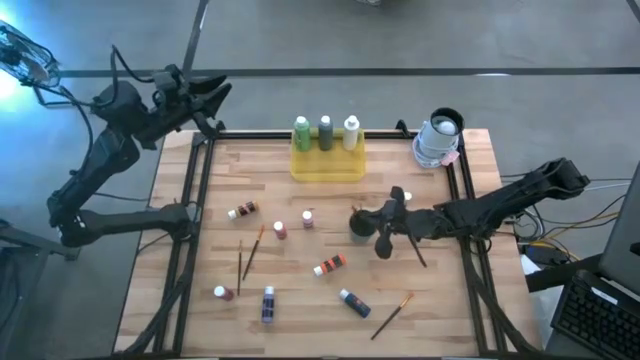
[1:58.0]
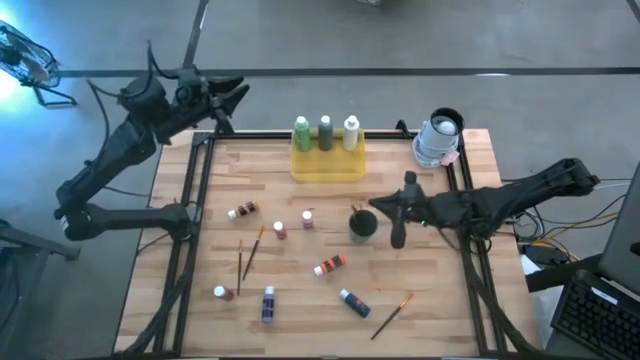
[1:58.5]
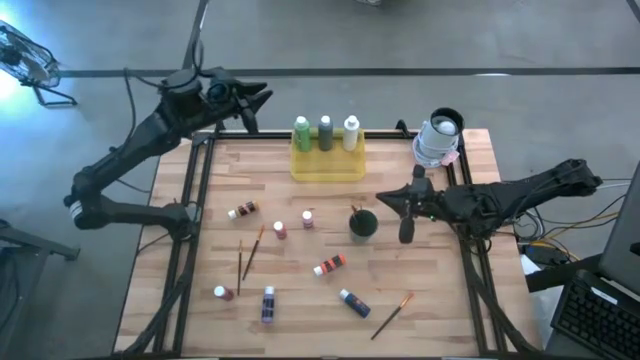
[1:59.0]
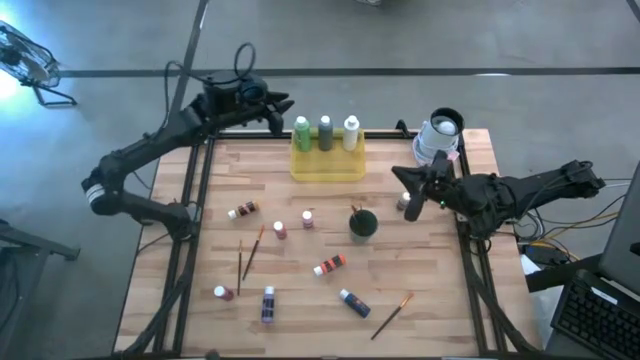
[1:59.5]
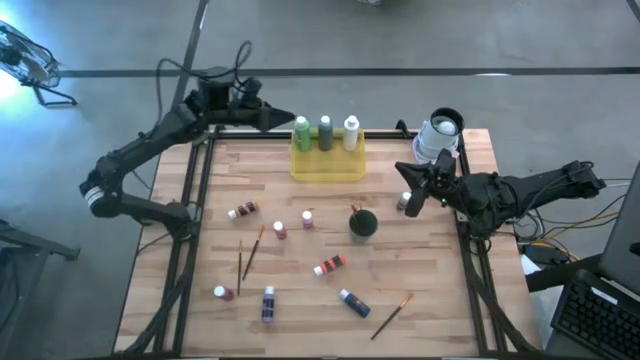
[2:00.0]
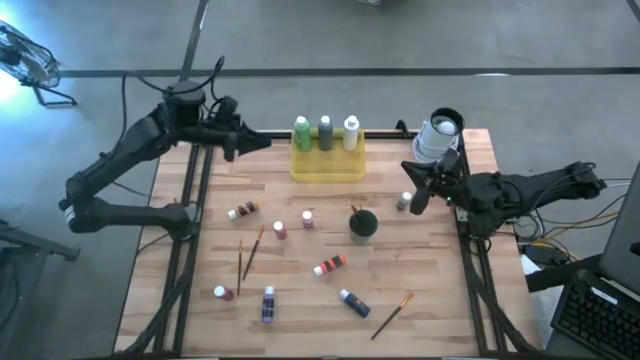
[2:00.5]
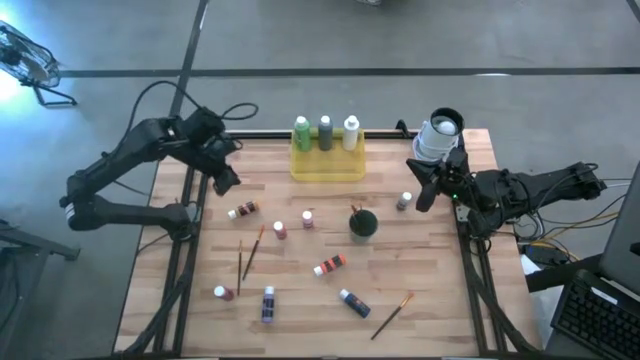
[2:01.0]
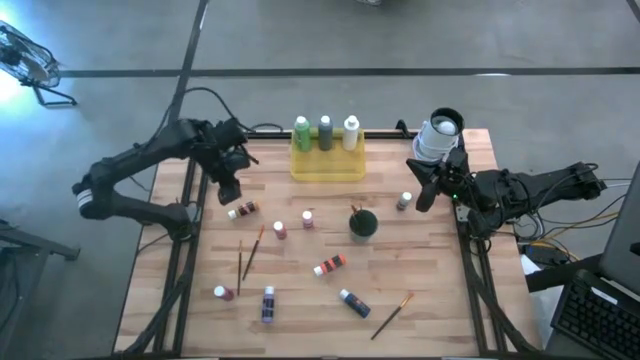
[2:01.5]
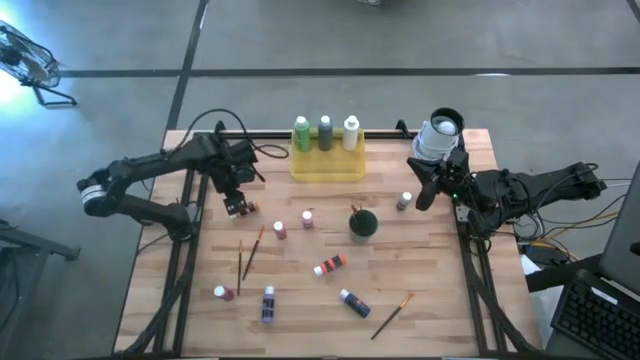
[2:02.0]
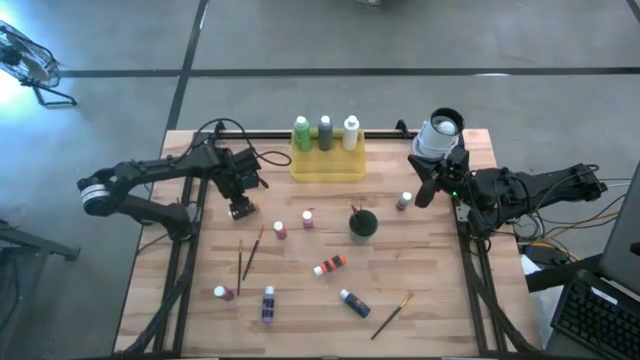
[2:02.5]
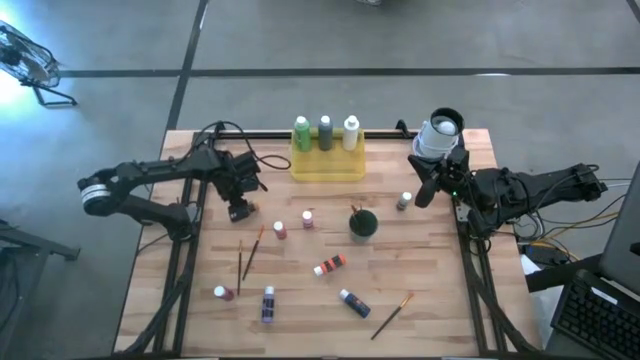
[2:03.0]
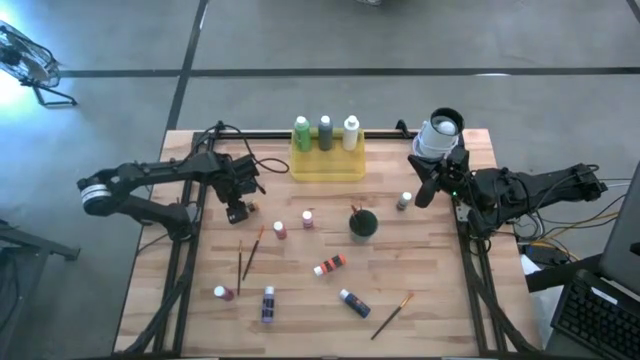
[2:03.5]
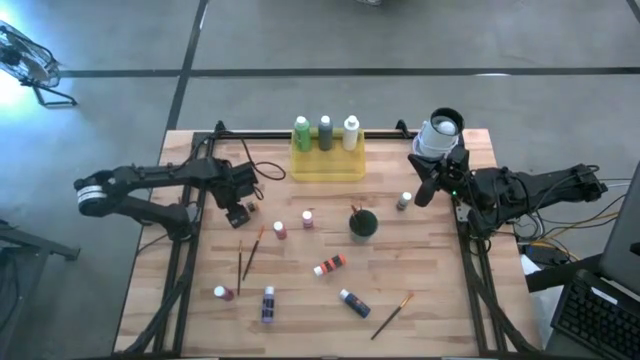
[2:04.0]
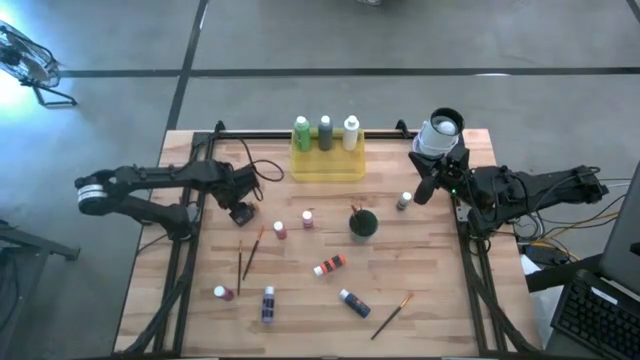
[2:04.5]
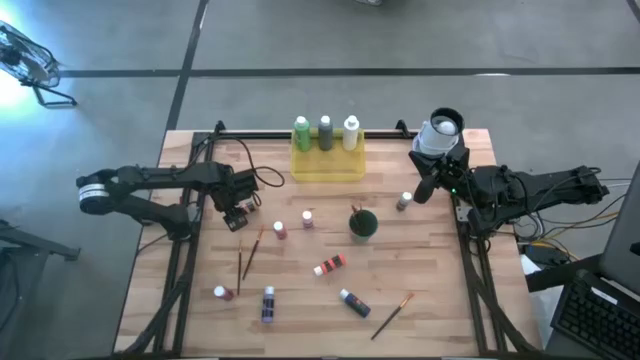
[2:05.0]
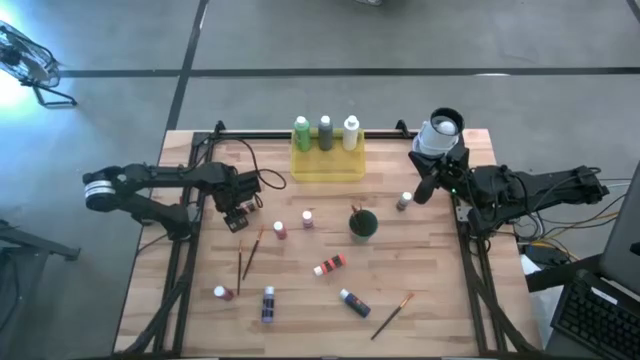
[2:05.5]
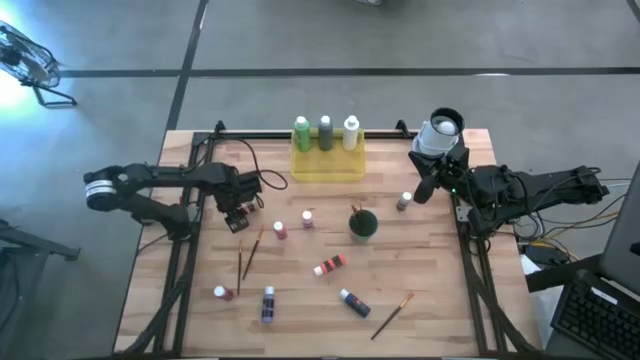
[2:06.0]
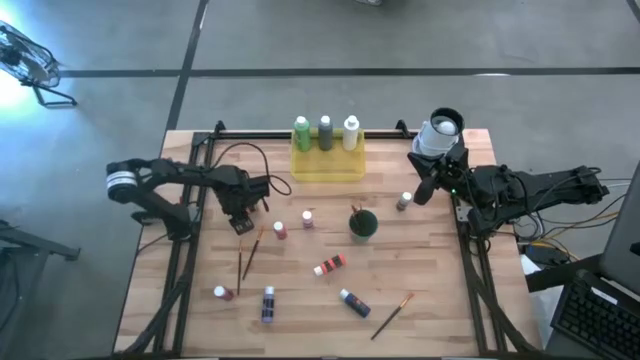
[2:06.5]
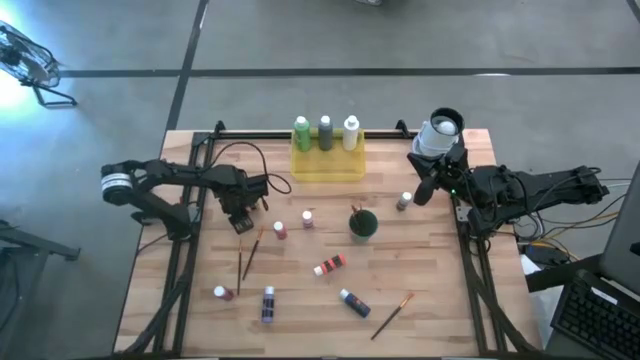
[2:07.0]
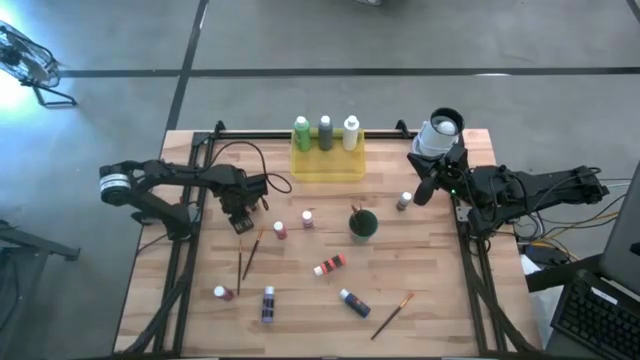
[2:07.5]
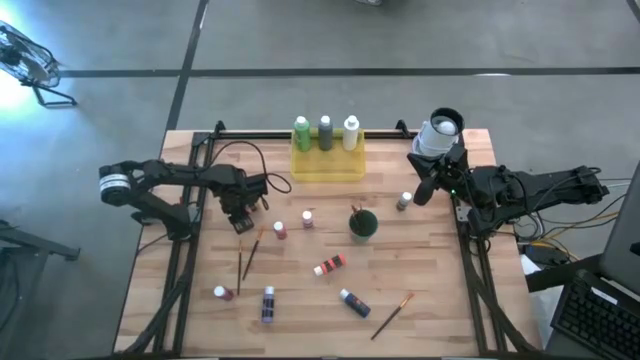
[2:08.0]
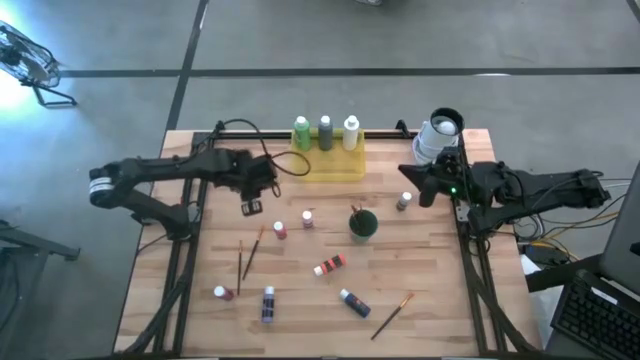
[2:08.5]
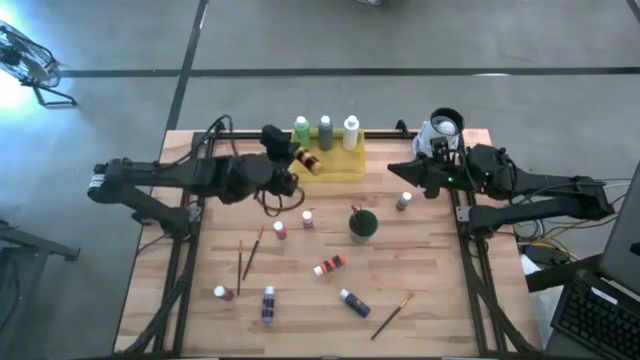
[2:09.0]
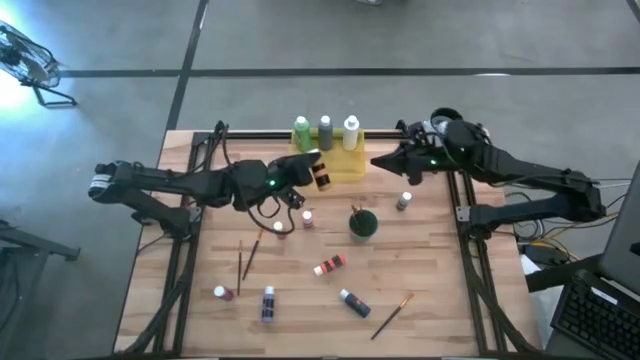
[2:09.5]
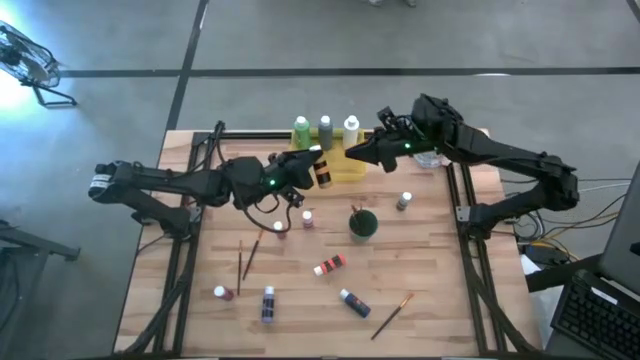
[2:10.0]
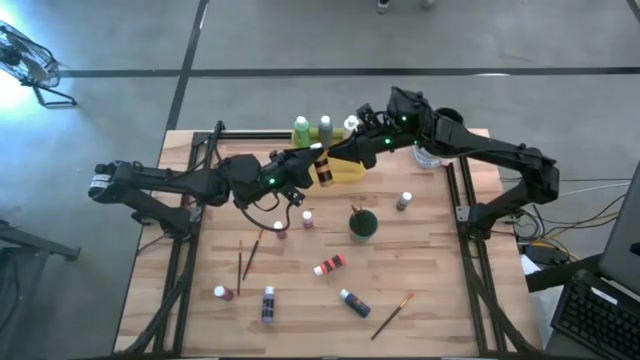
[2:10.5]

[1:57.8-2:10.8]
Task: Pick & Place Paint Supplies
Put the yellow paint bottle into the yellow bin

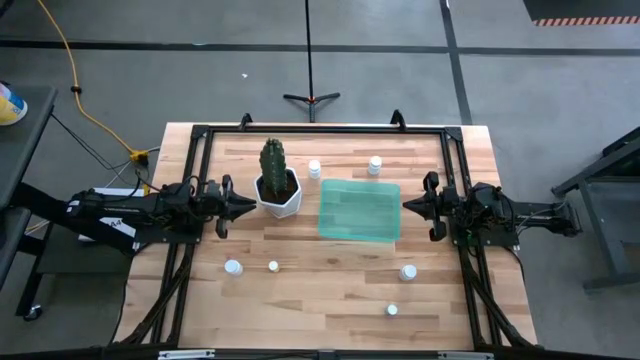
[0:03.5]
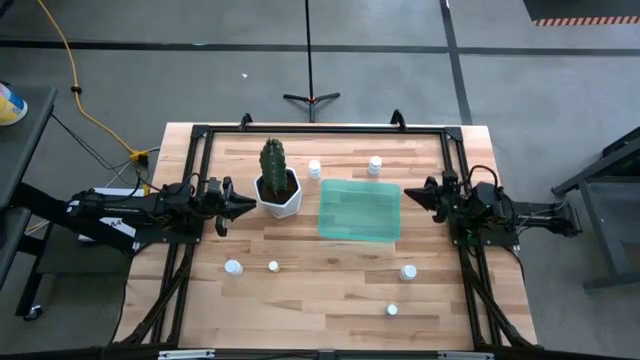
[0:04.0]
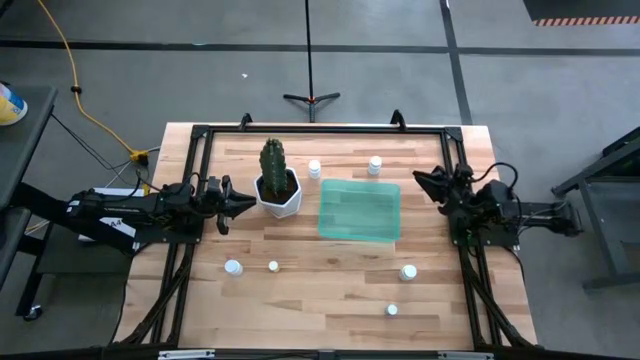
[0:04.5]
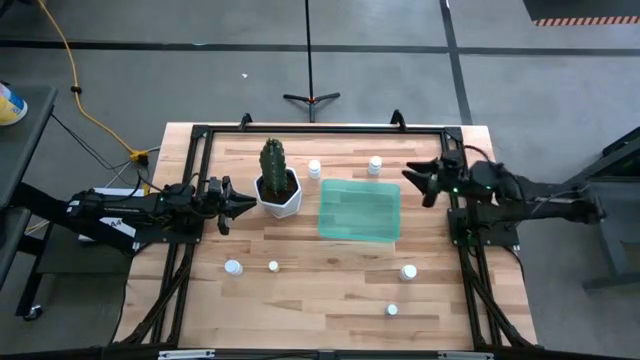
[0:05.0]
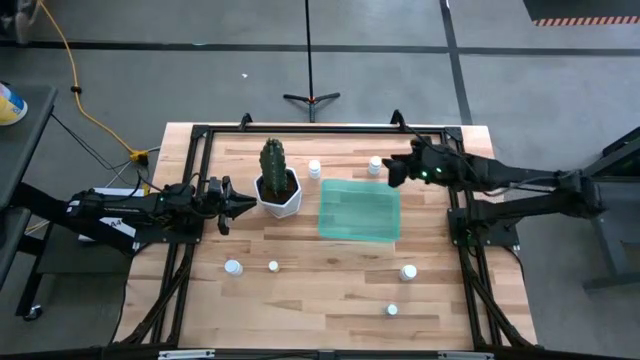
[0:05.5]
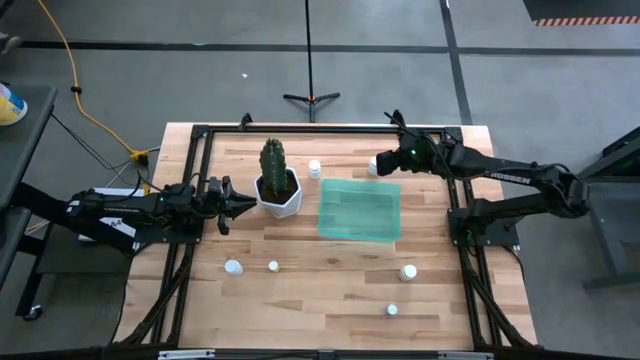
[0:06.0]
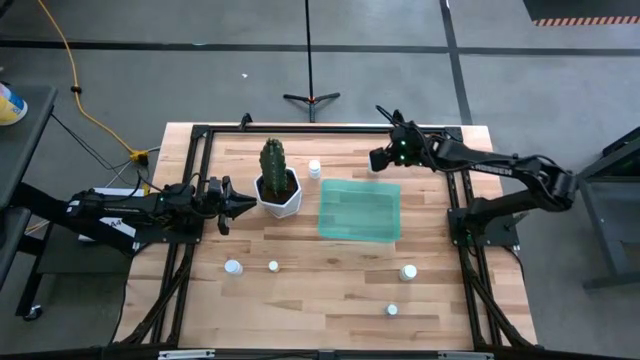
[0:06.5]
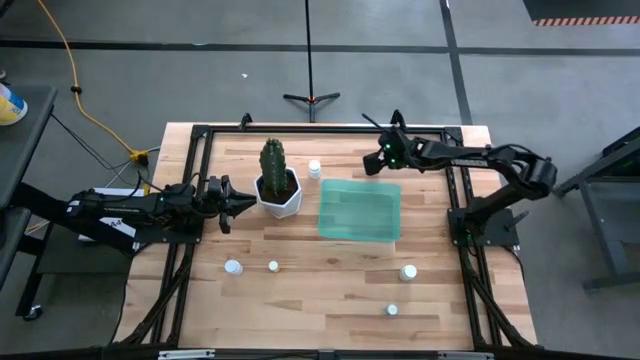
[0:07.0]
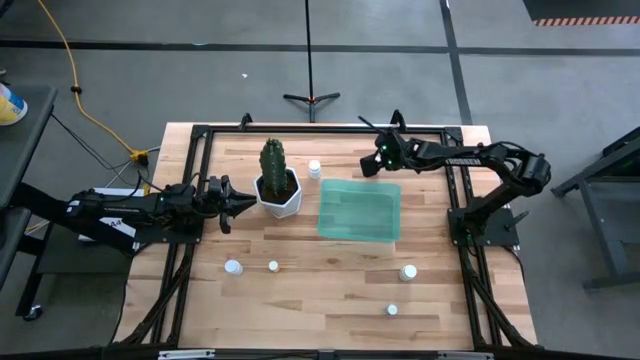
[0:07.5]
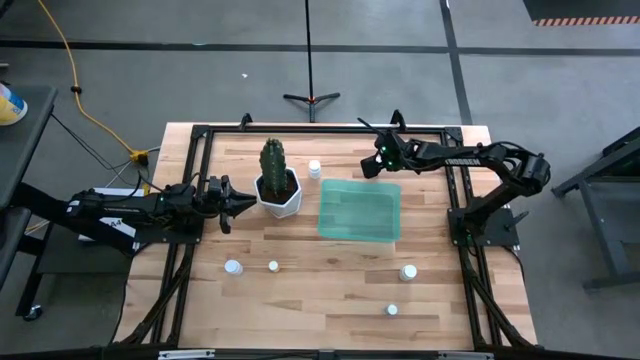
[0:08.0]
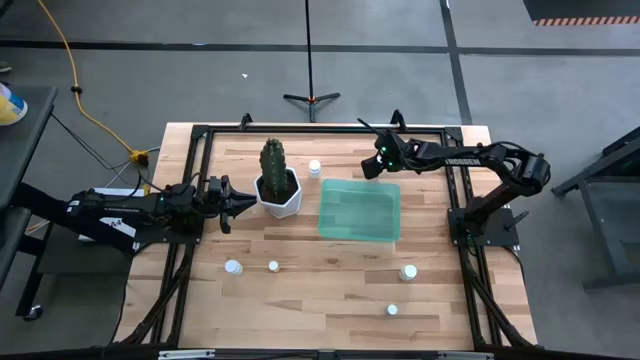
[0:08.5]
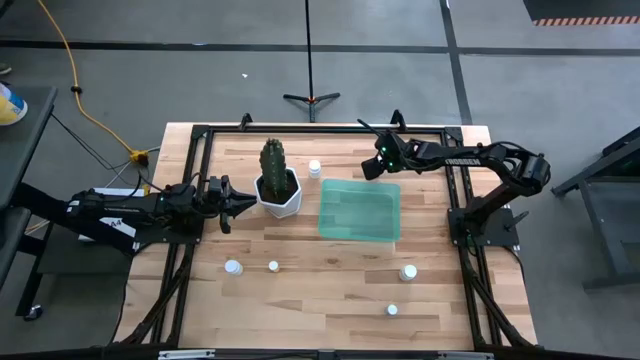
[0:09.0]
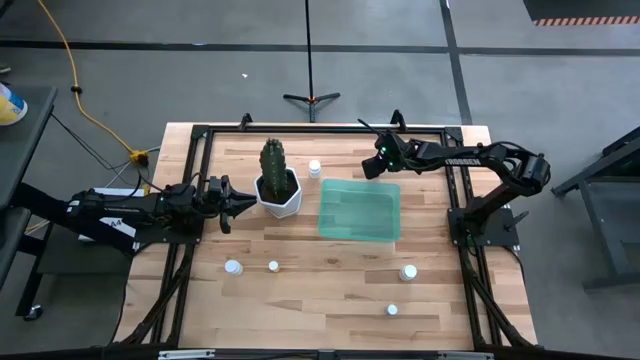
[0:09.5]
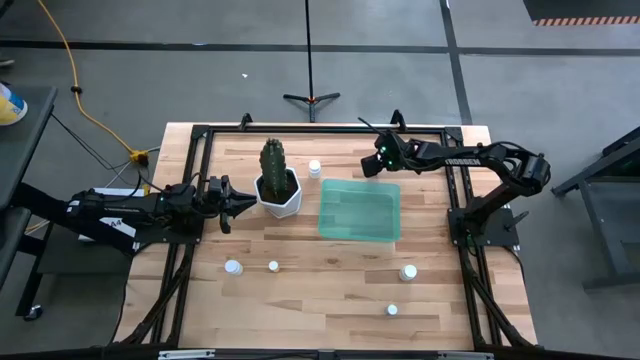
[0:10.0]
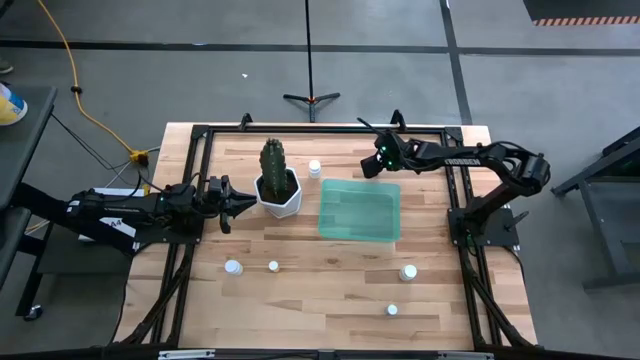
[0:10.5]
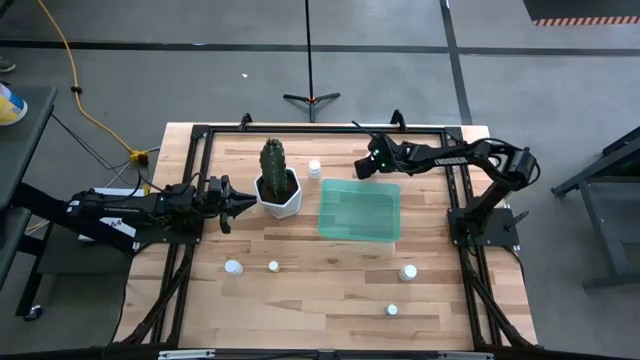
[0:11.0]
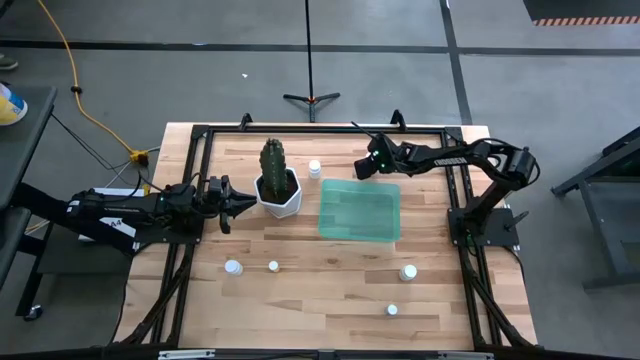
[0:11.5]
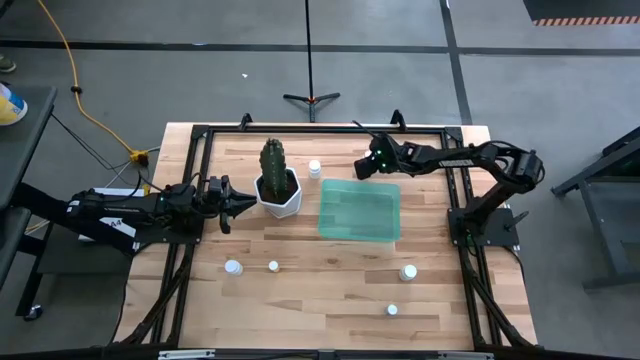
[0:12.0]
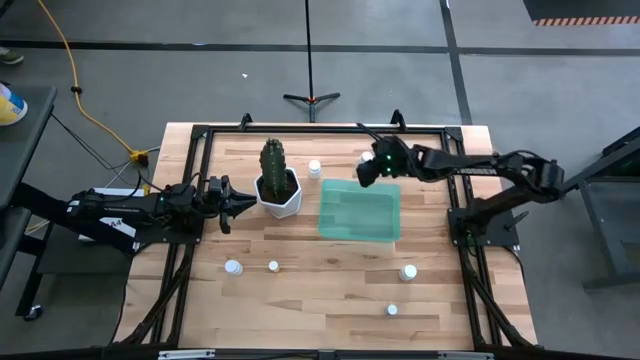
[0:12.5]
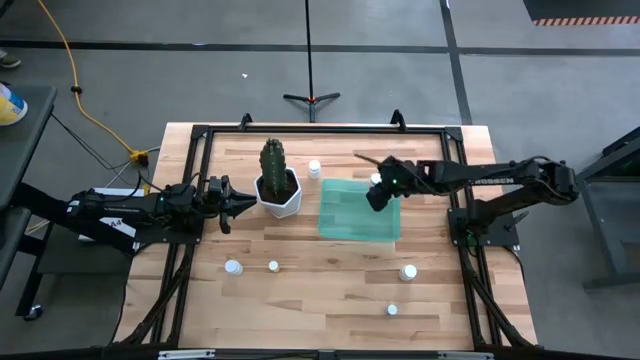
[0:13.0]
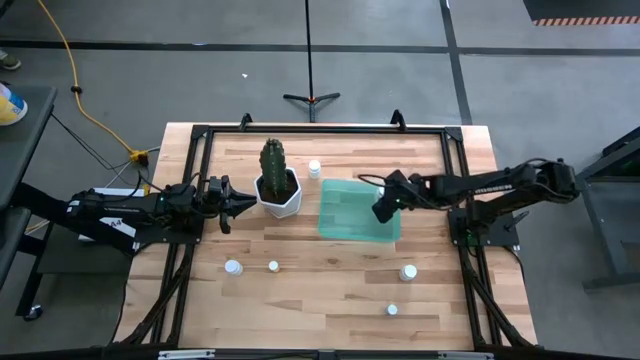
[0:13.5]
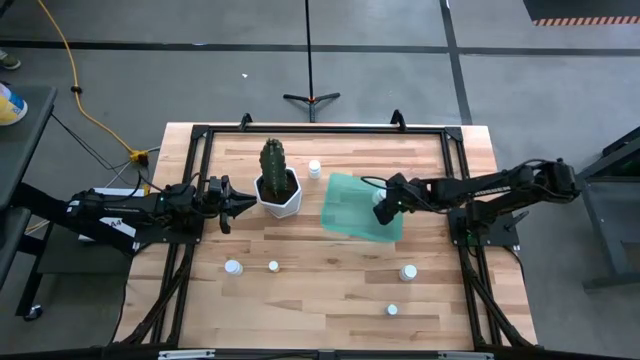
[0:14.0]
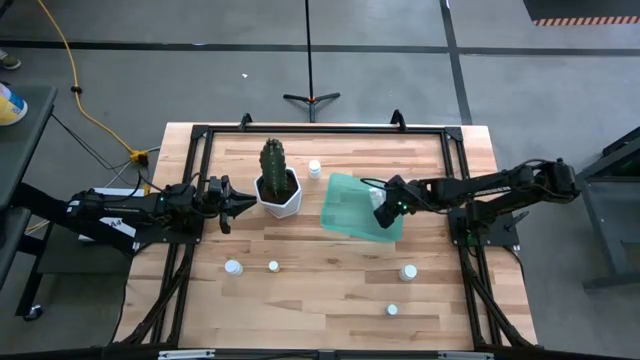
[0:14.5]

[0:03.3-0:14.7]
Task: Pick and place pill bottles into a basket
Put the white pill bottle into the light green bin
